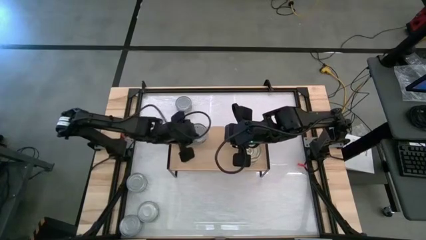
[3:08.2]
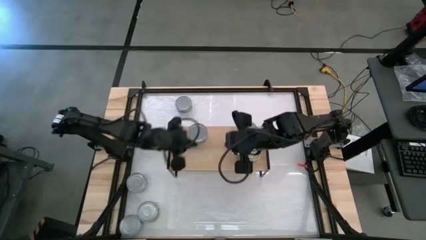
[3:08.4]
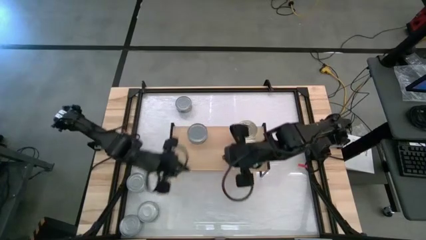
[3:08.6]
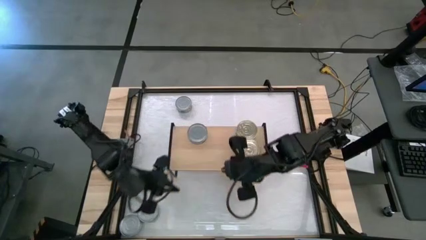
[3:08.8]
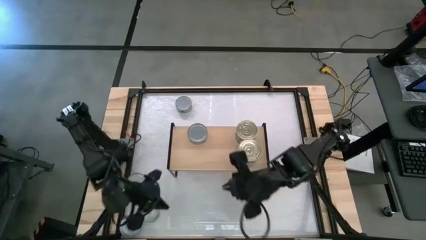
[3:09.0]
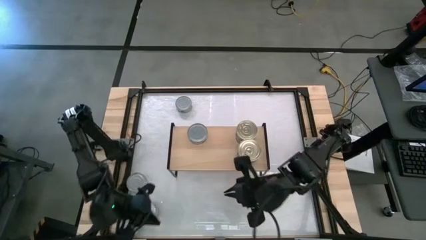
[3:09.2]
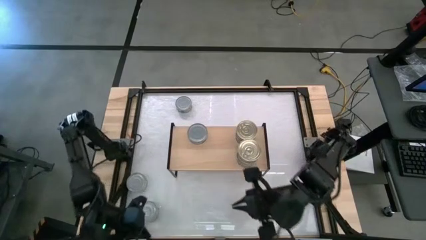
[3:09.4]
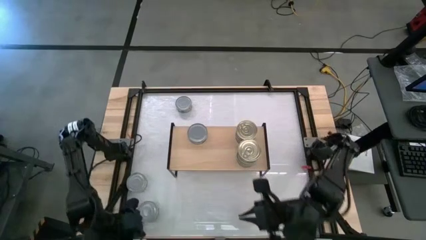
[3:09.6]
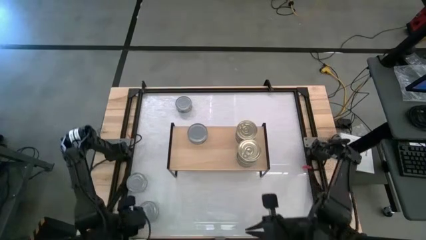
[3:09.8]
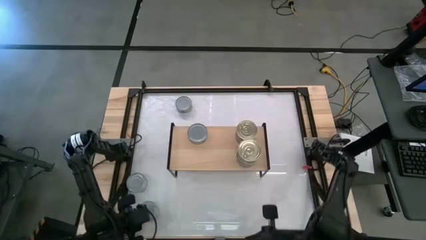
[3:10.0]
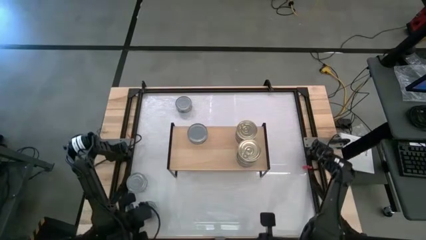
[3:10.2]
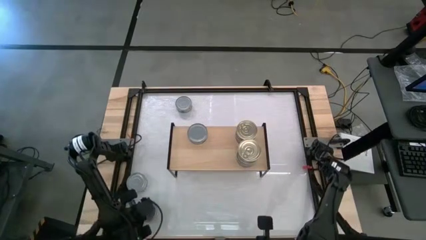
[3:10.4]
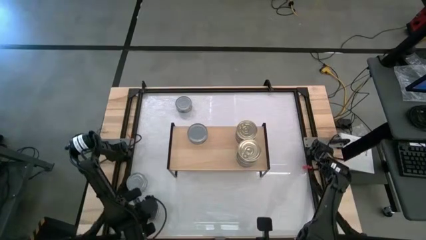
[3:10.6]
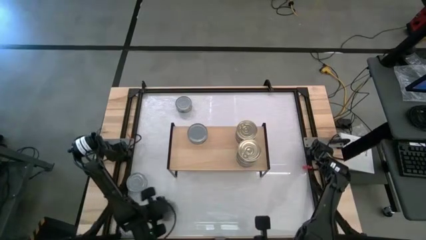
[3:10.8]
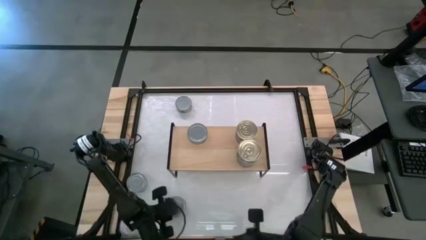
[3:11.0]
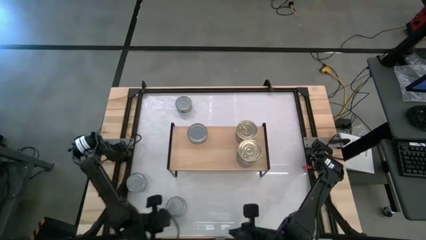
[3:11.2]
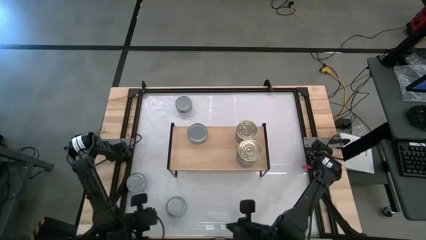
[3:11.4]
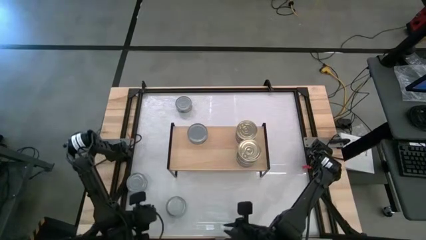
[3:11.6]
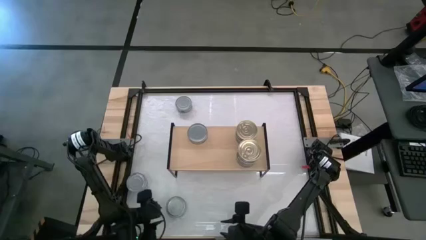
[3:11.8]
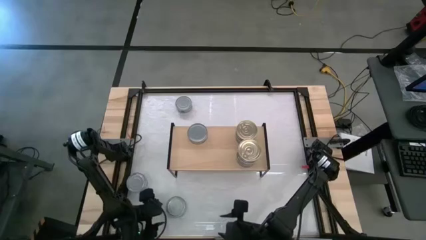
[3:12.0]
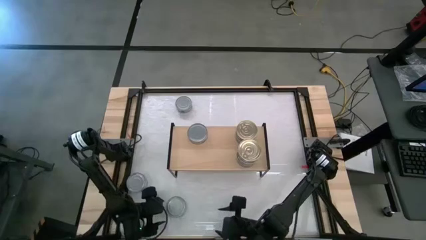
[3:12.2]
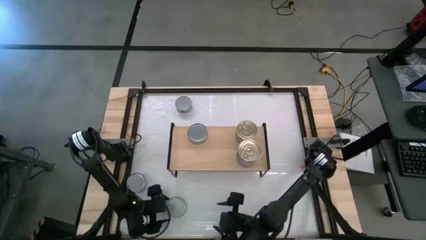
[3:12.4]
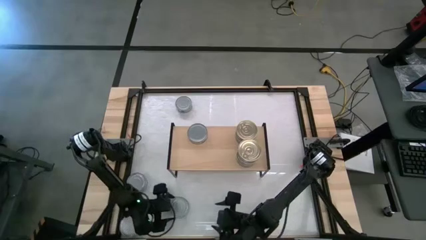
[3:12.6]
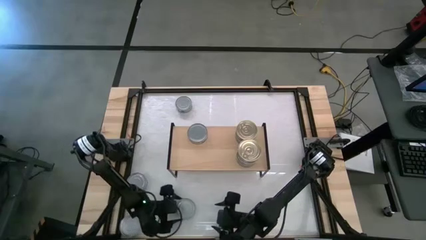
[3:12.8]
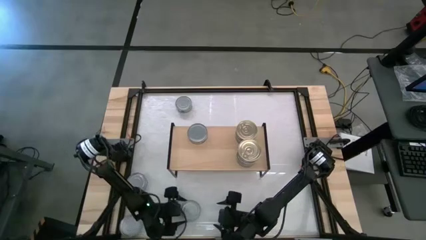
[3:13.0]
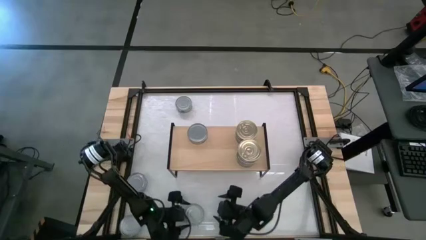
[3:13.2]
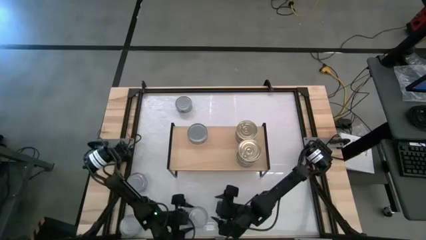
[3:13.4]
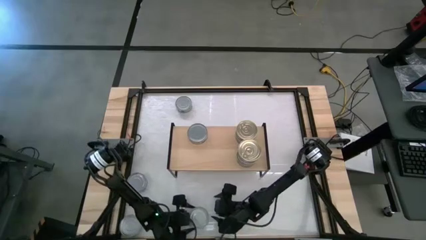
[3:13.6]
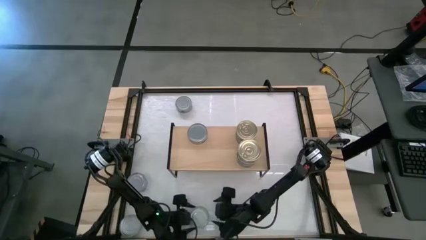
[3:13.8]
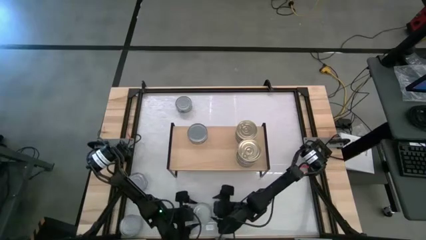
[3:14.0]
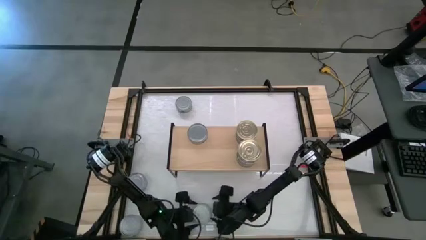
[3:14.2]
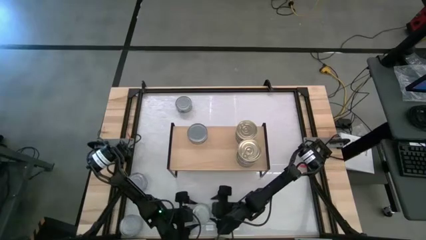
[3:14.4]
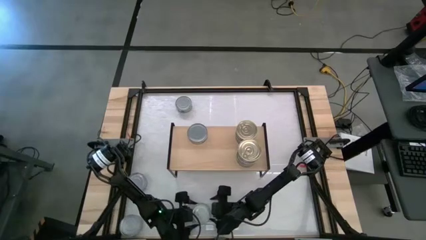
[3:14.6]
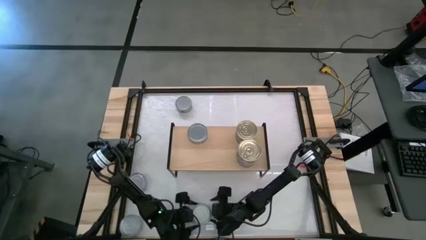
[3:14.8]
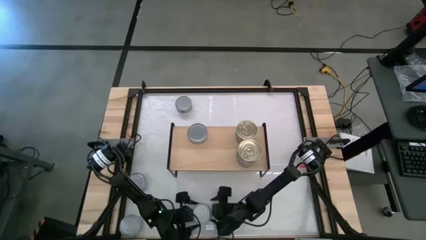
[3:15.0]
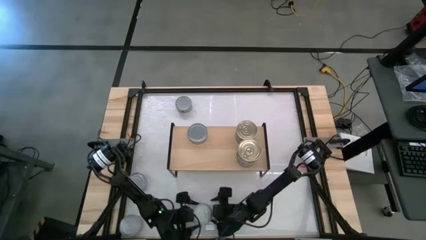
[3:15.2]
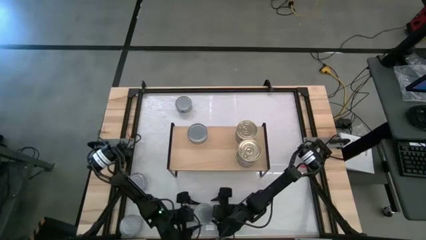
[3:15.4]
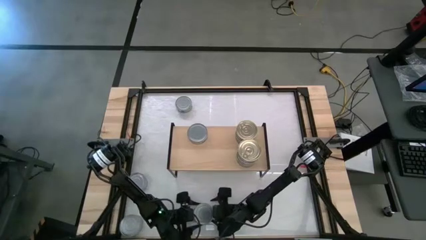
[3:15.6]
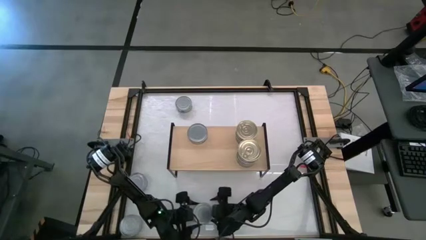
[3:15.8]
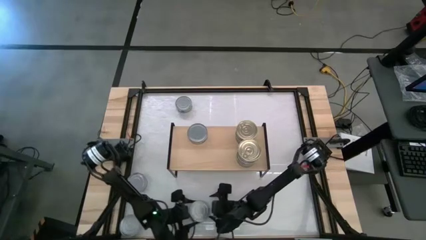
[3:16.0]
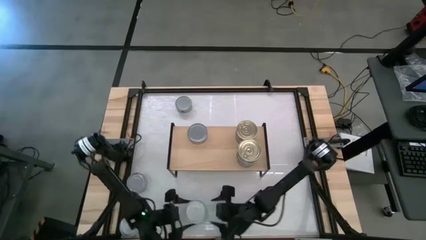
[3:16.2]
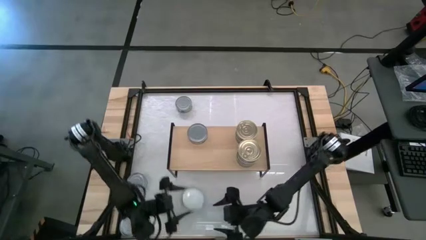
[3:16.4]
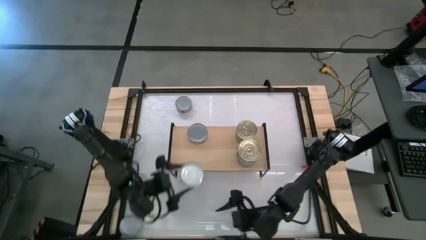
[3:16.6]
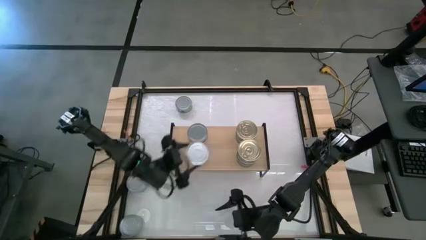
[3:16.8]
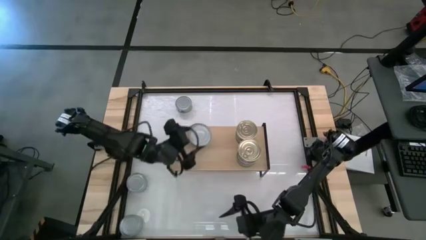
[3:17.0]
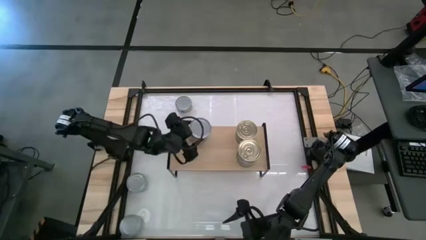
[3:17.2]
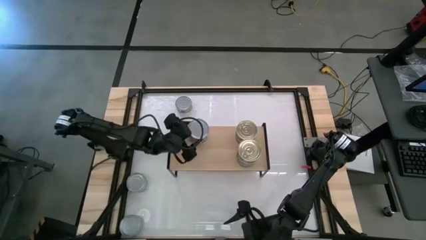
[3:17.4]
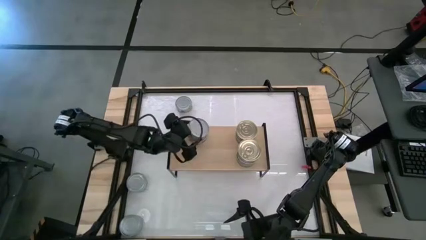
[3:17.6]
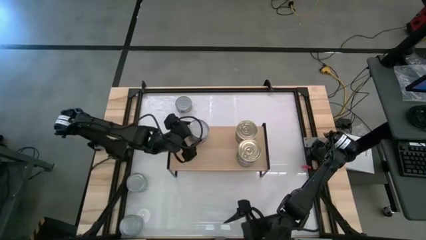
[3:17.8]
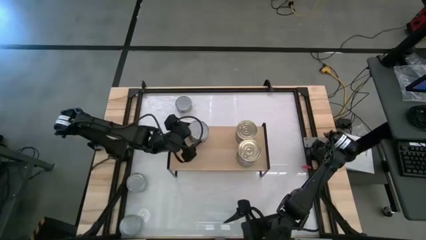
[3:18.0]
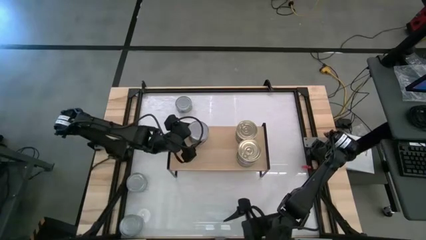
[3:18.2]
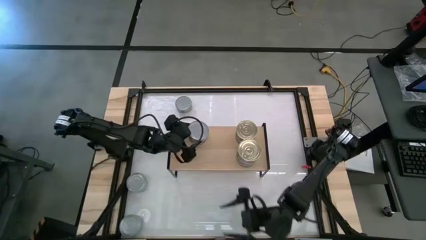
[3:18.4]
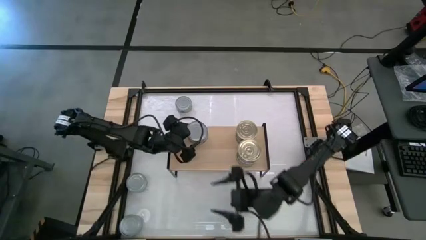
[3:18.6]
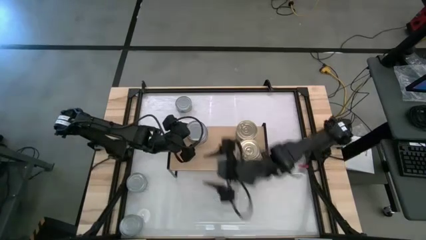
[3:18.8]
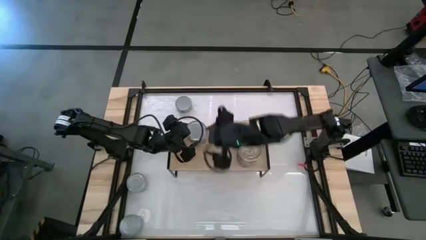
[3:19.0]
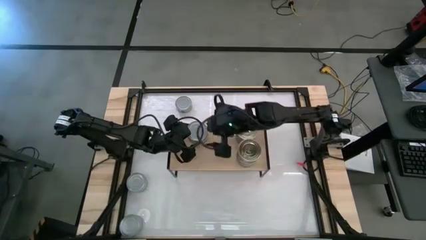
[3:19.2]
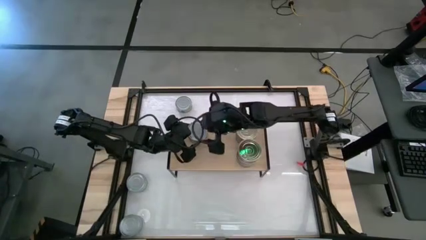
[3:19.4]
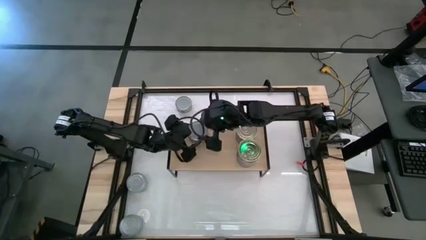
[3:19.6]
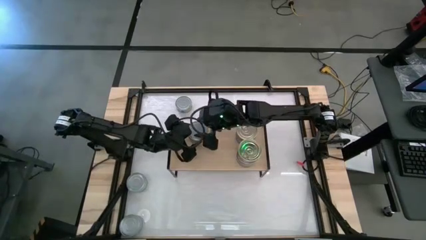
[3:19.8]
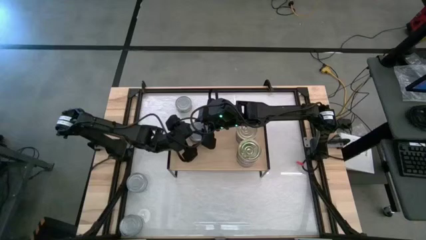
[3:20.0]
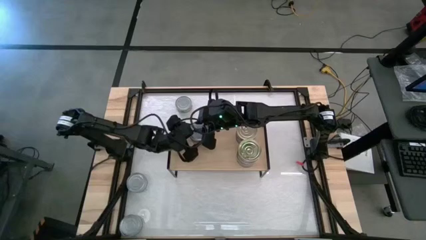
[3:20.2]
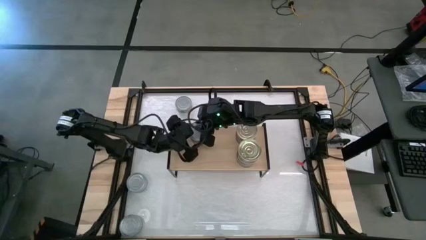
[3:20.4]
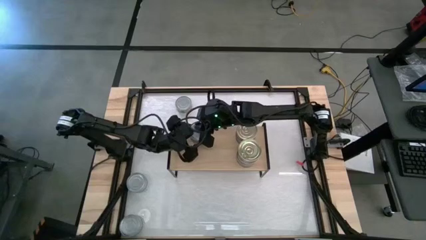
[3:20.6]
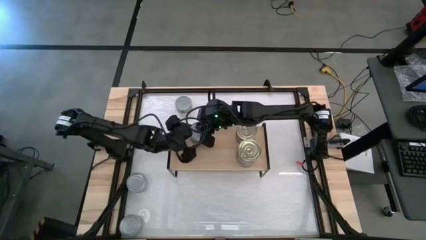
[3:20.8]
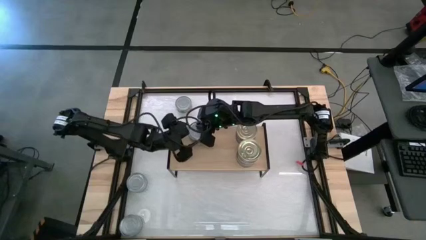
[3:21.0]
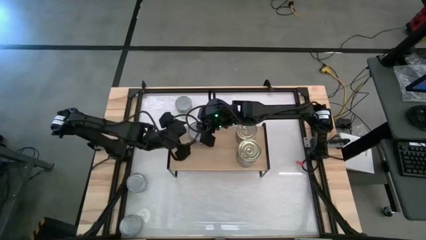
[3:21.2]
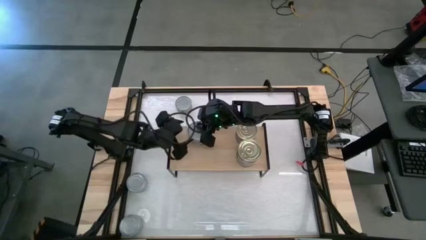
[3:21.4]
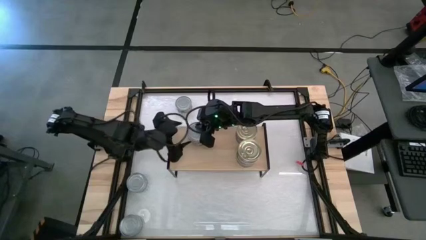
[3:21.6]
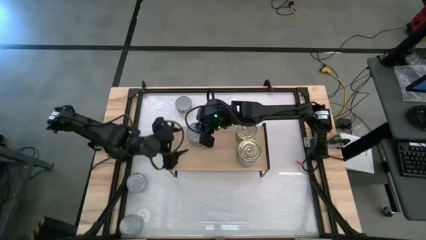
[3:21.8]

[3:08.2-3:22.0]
Task: Stack canned seafood by type on shelf
Stack the green tuna can on top of the other green tuna can on the shelf
